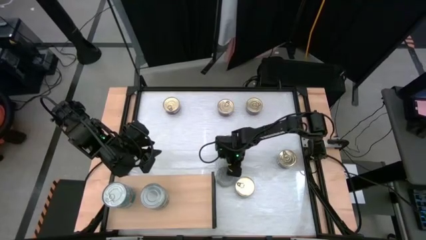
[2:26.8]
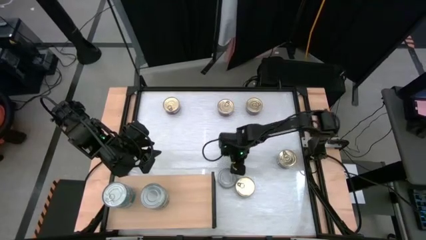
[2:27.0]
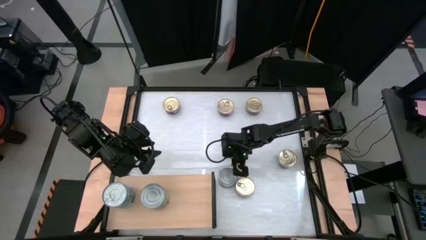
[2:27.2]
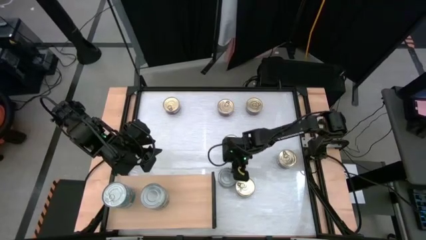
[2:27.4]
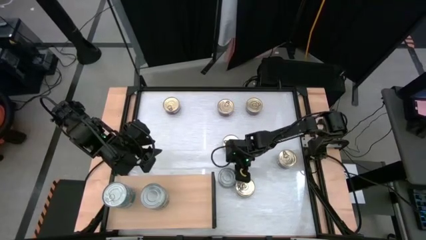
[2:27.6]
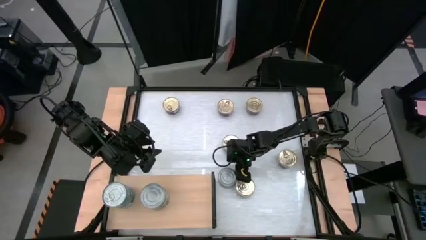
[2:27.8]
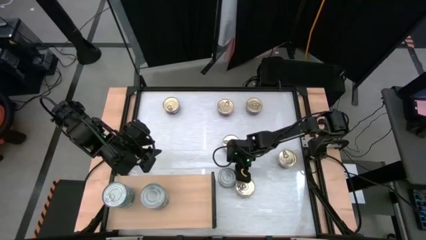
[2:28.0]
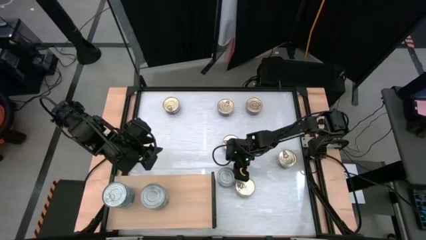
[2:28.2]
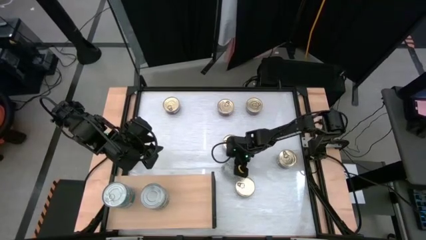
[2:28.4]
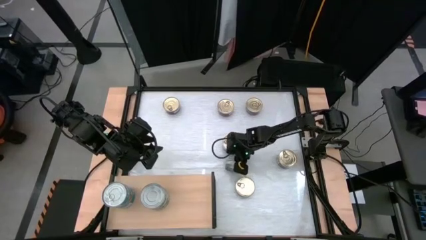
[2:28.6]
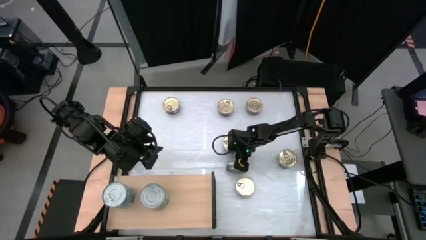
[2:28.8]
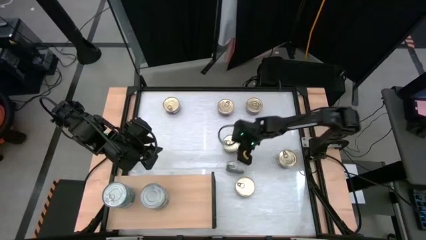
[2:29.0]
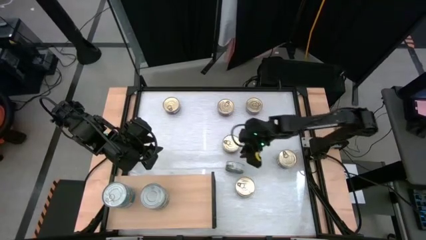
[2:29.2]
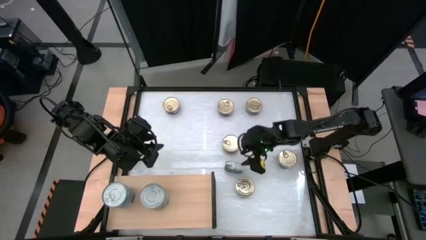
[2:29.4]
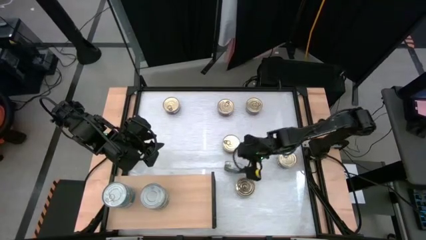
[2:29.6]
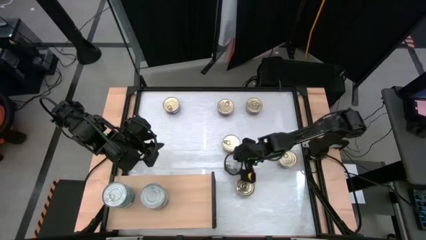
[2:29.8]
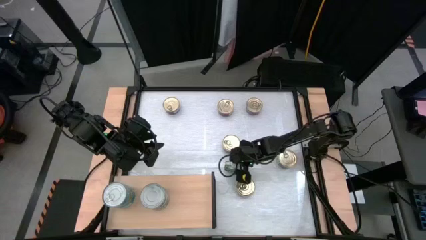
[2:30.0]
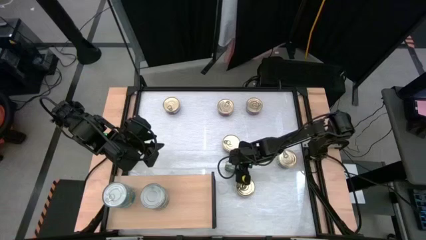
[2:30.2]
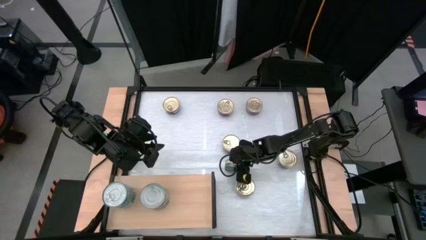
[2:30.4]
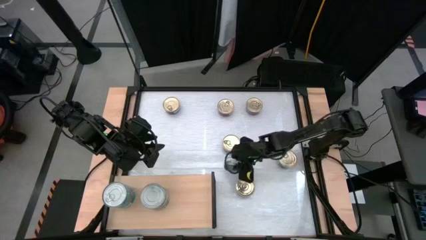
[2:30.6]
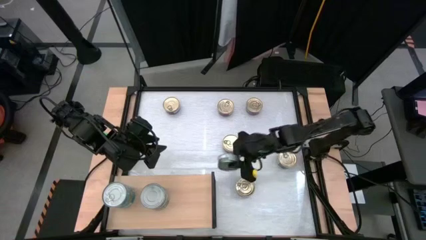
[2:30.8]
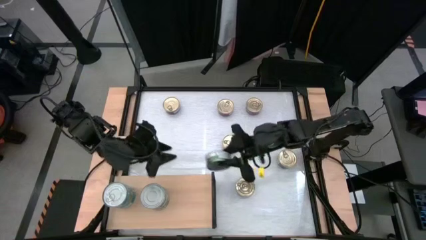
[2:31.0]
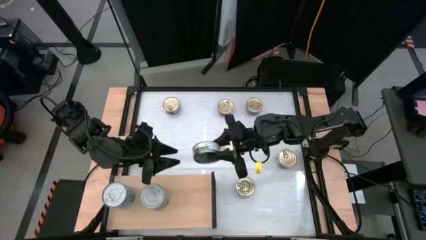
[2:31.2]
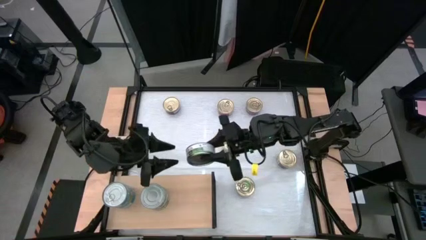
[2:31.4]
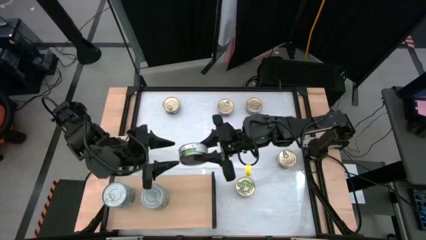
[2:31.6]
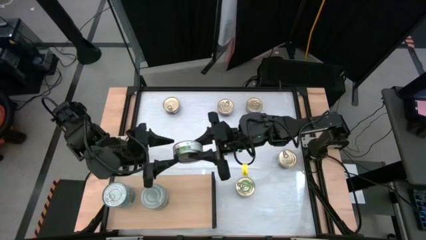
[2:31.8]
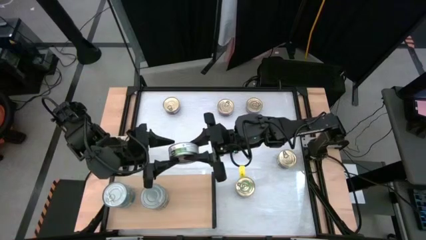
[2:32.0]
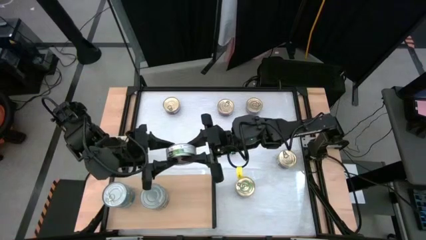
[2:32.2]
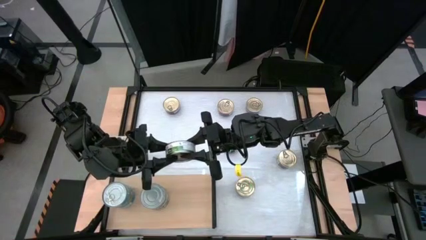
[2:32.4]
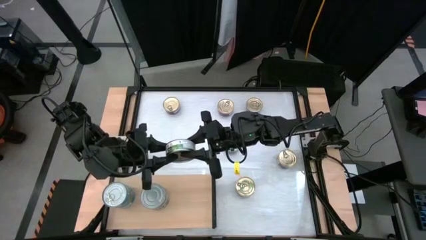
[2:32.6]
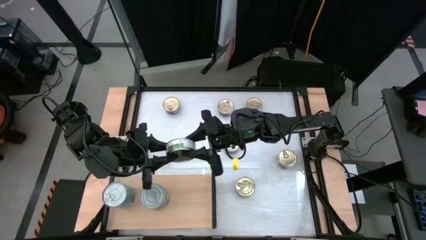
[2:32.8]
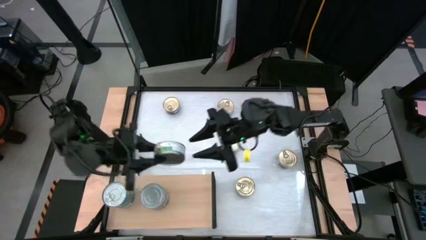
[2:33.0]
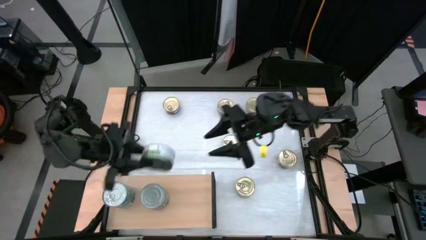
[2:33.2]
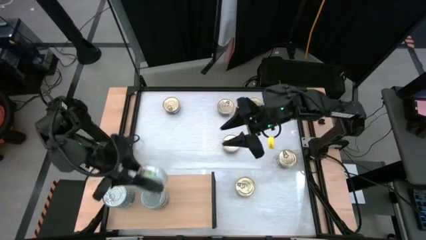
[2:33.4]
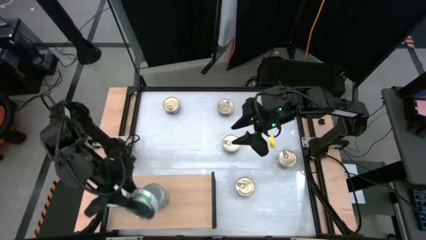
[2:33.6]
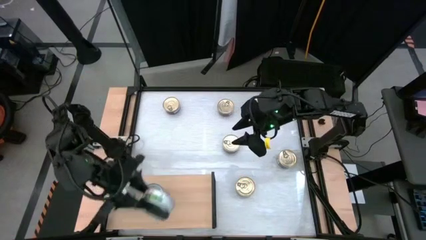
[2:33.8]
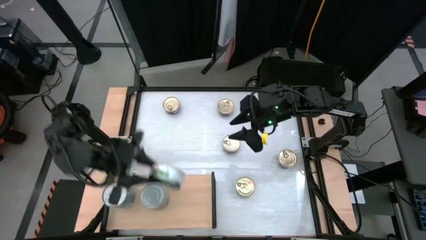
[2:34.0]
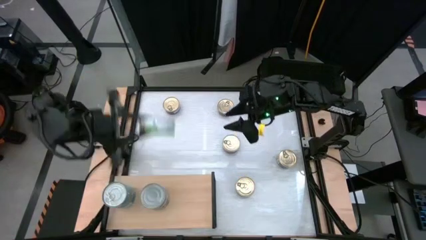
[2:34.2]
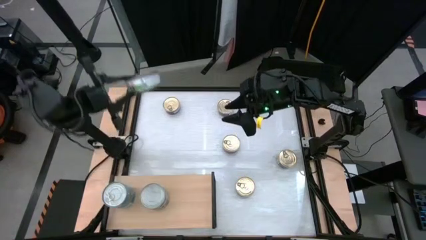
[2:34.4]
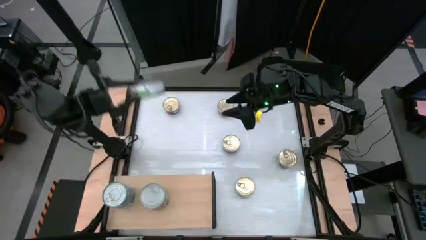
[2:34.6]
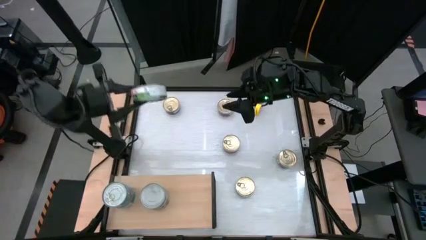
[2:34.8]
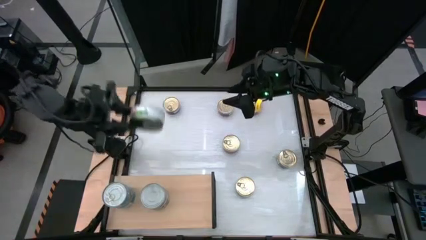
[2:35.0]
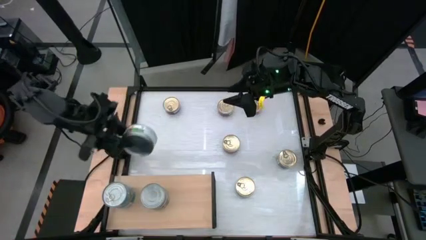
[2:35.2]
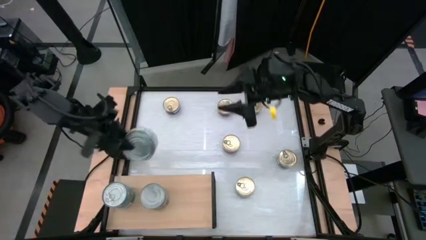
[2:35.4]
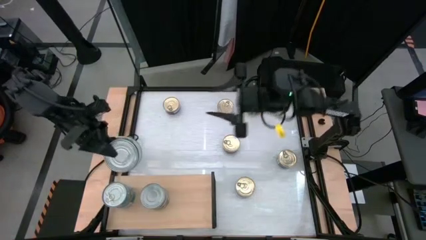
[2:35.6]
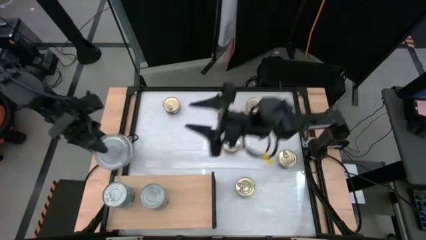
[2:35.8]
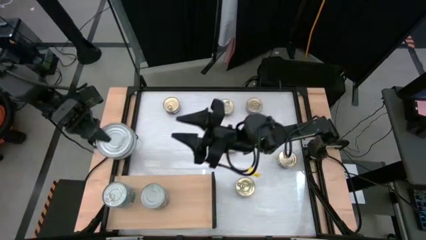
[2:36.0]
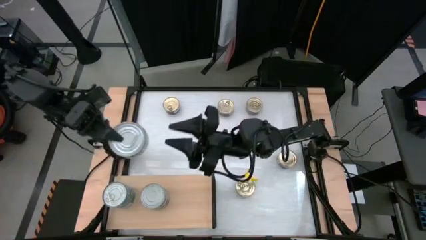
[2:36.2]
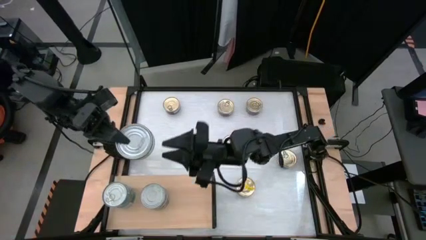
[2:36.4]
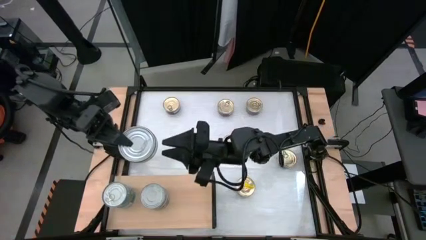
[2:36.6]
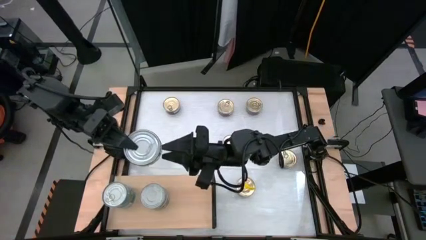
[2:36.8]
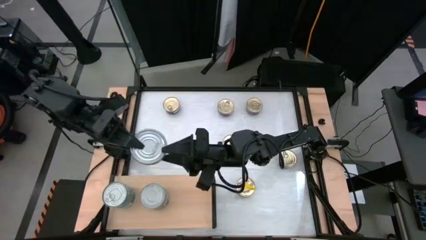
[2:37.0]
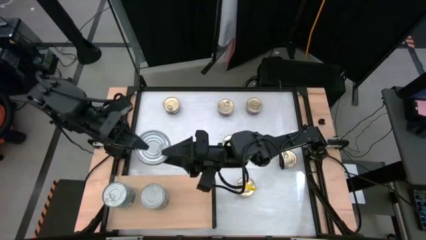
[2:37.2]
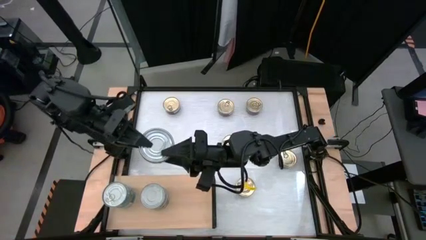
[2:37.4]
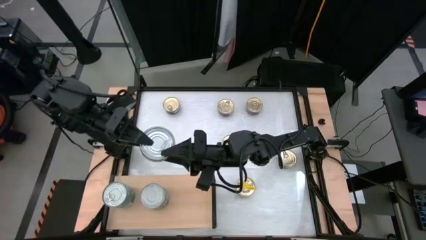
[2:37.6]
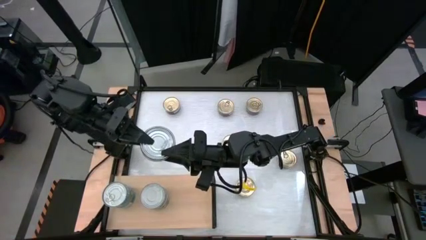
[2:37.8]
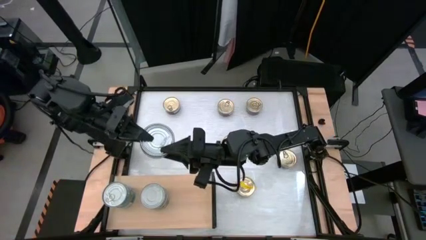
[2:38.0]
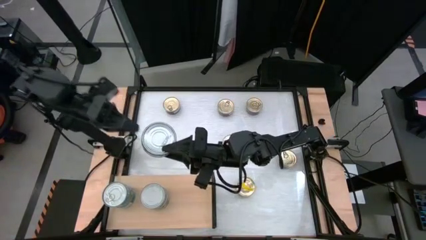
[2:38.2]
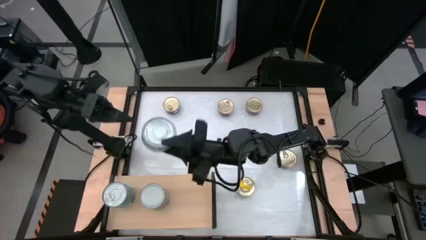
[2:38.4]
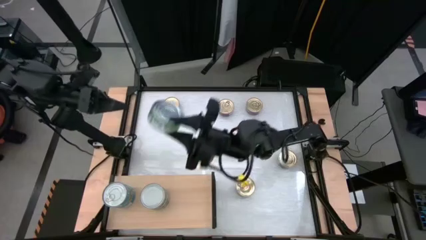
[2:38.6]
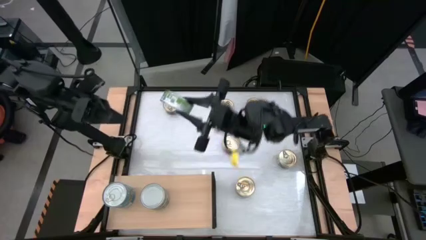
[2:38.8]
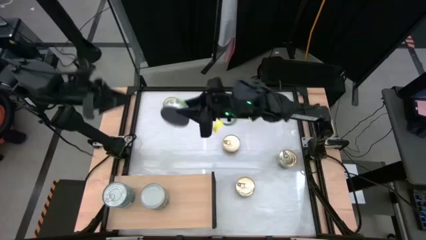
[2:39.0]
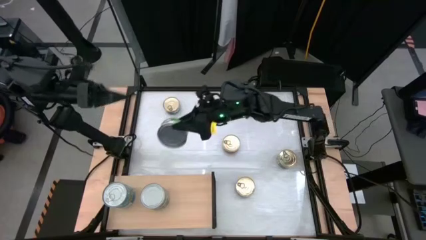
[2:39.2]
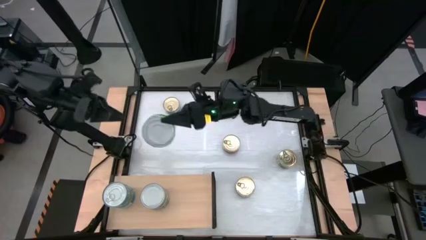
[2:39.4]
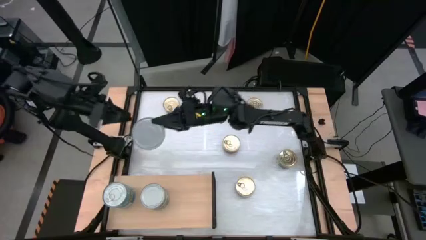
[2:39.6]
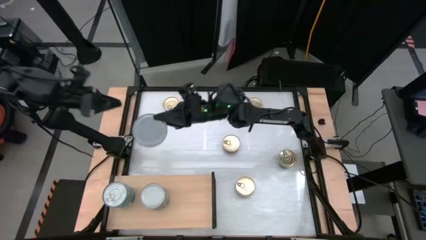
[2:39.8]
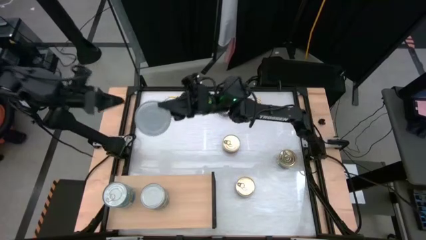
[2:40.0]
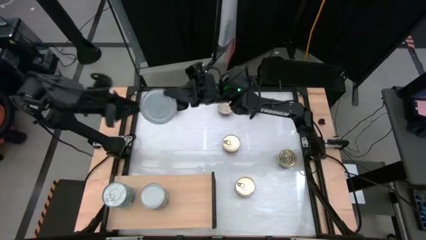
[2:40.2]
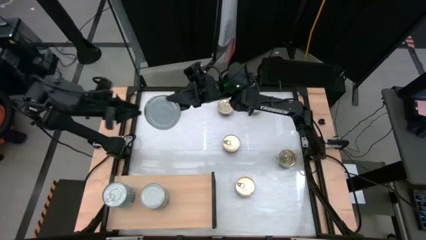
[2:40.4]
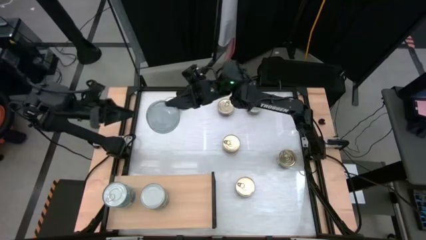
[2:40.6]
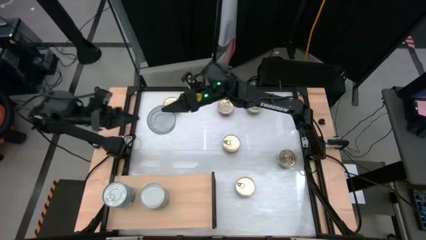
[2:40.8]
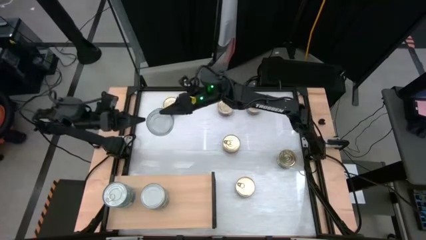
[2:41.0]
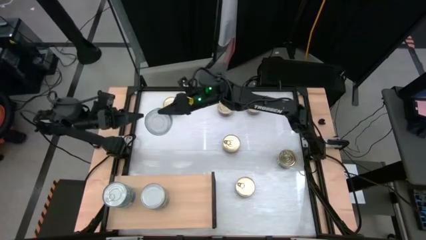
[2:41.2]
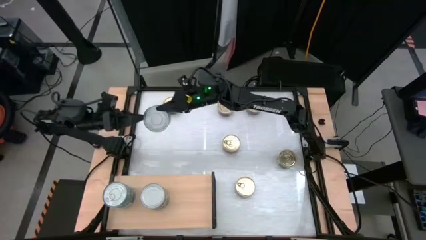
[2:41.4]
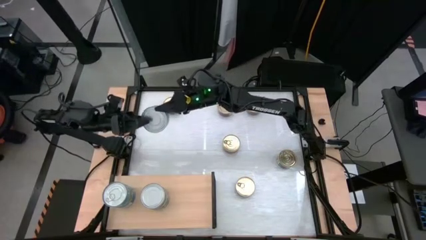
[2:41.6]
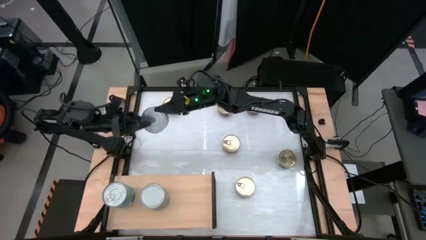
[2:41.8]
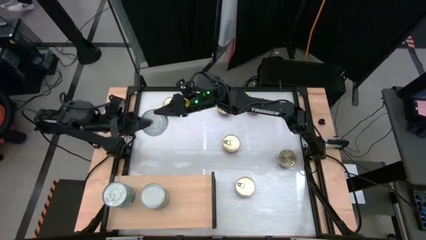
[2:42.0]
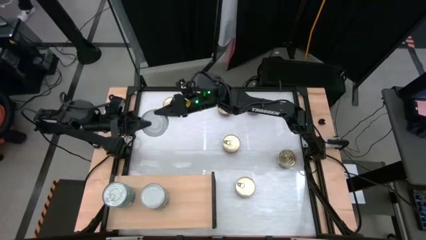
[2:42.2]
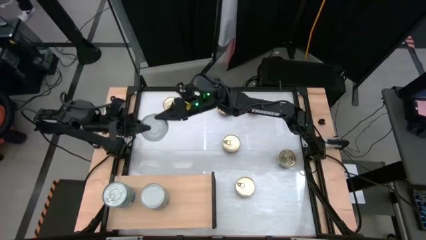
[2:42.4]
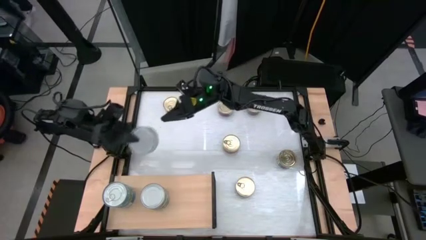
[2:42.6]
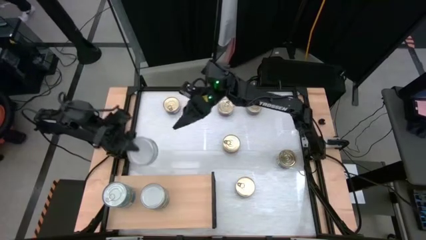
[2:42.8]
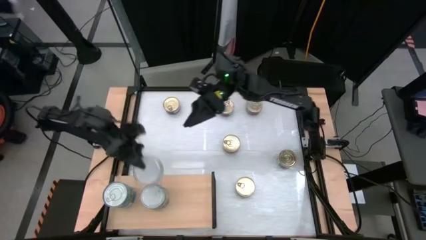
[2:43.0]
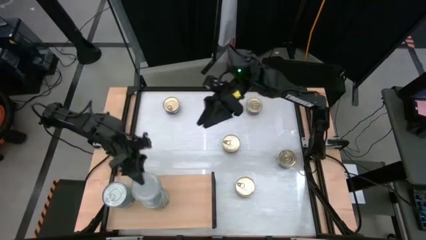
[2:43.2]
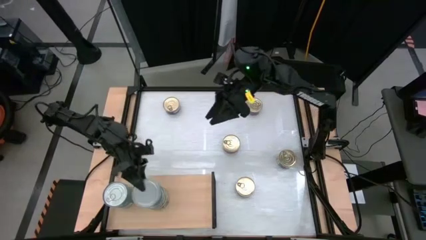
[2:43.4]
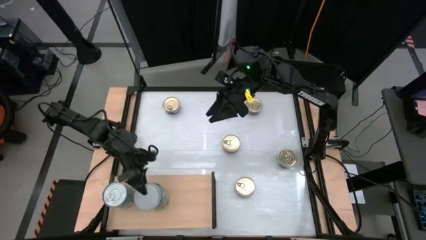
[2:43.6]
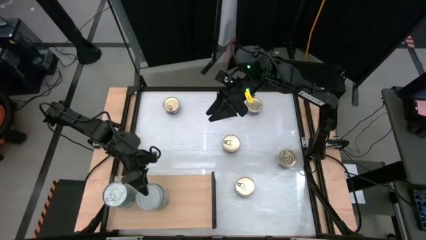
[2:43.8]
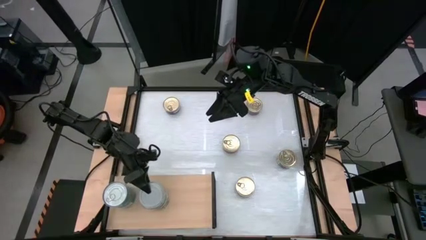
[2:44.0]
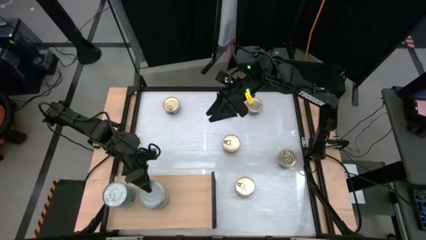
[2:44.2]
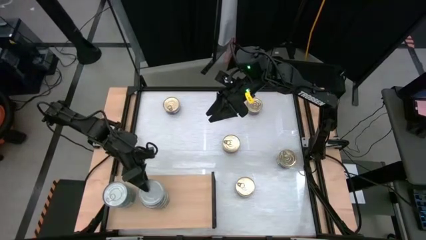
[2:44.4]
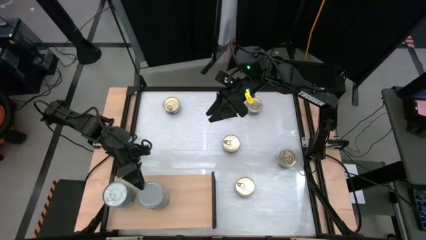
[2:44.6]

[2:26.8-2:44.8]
Task: Stack canned seafood by type on shelf
Stack the green tuna can on top of the green tuna can on the shelf
